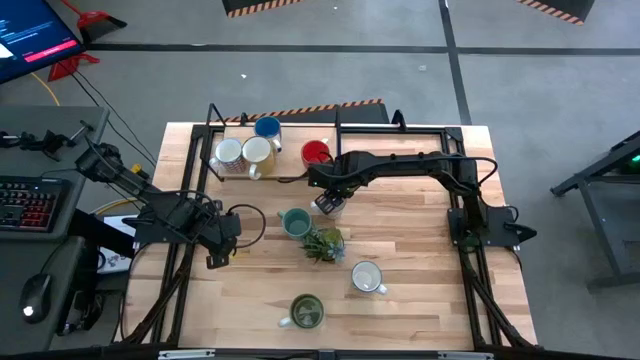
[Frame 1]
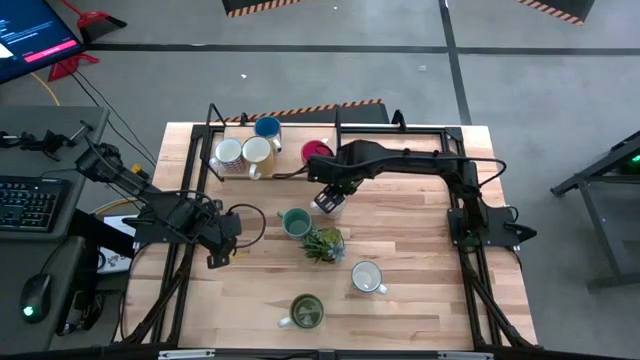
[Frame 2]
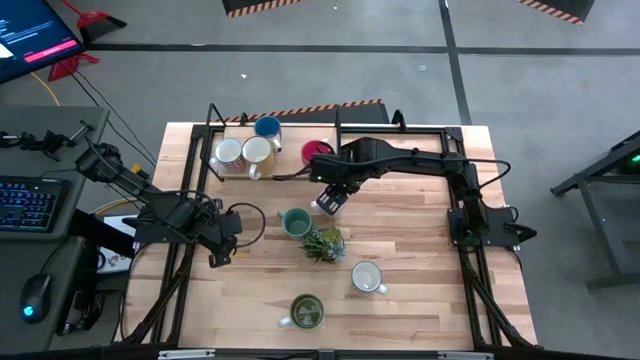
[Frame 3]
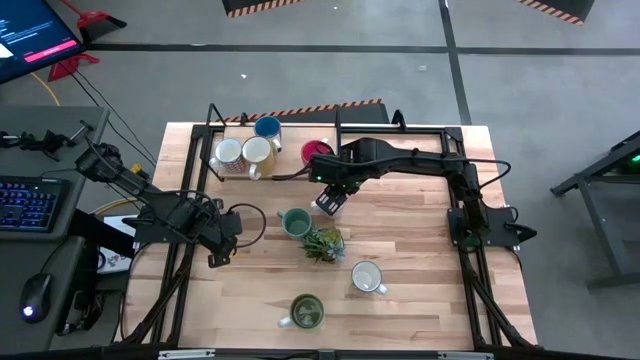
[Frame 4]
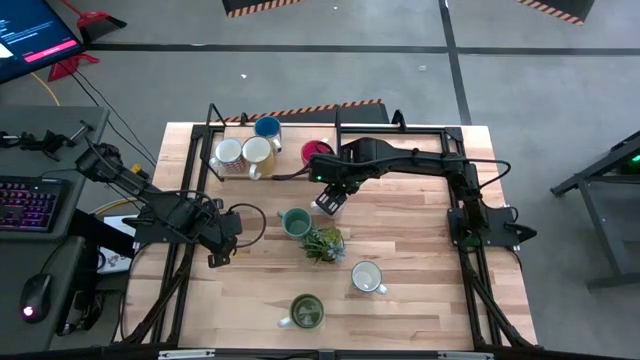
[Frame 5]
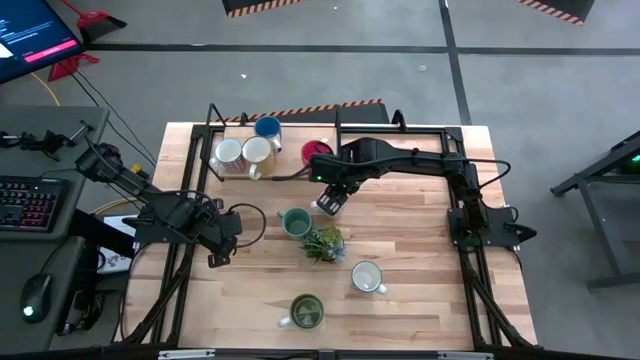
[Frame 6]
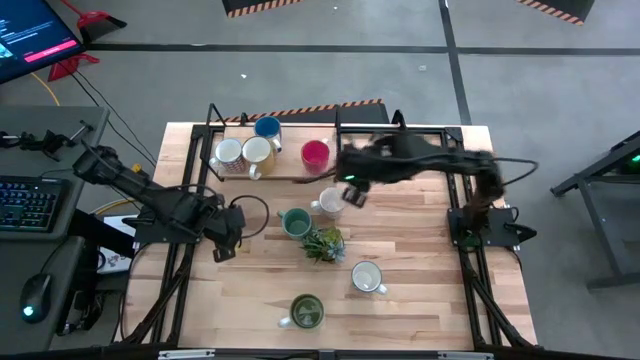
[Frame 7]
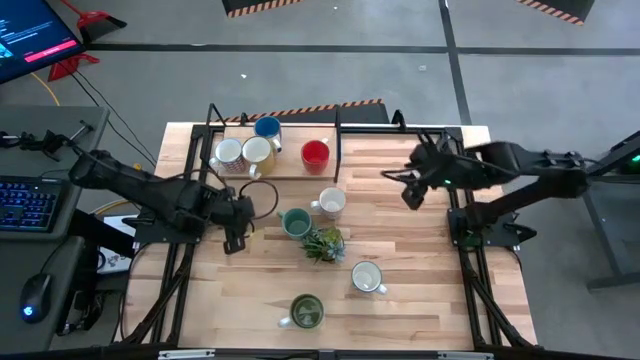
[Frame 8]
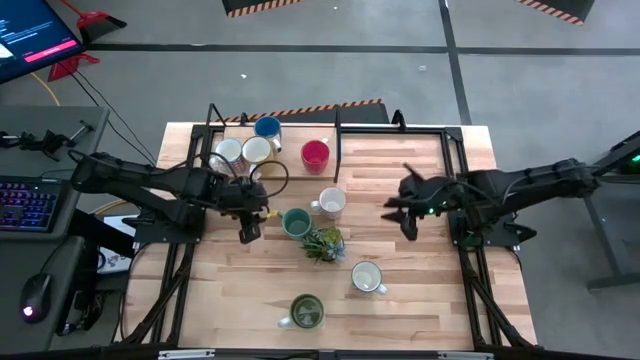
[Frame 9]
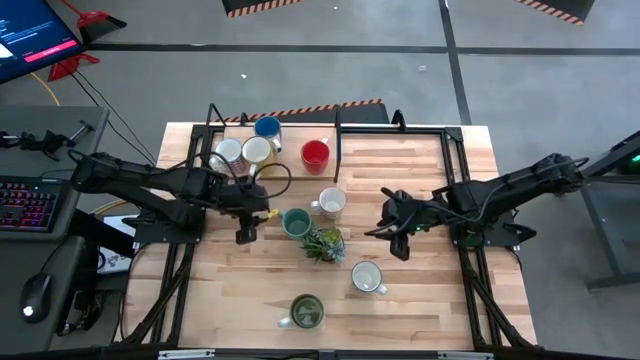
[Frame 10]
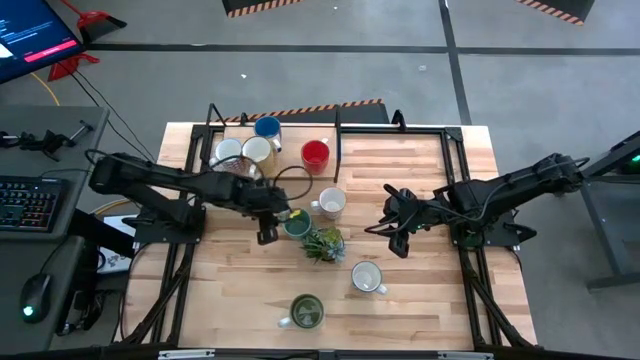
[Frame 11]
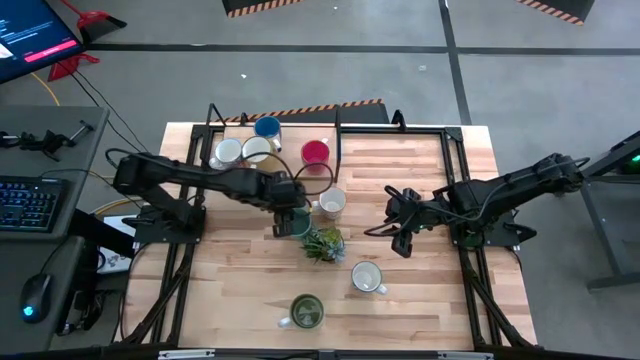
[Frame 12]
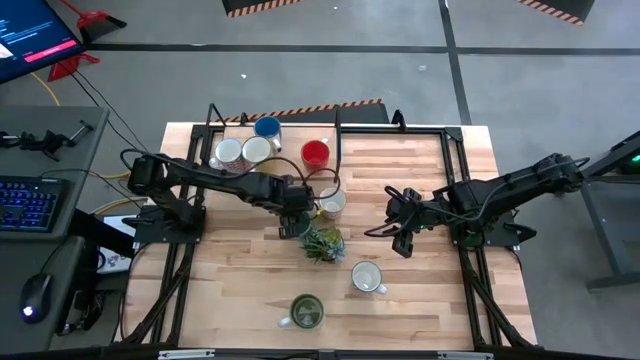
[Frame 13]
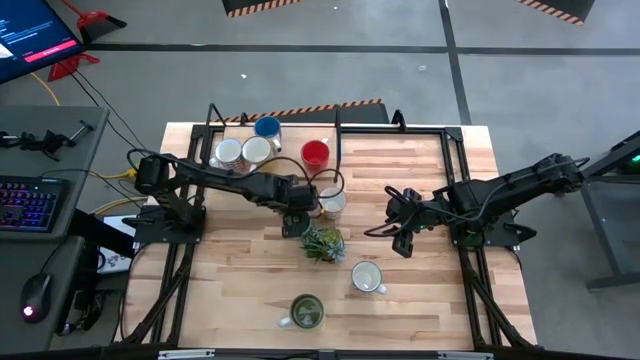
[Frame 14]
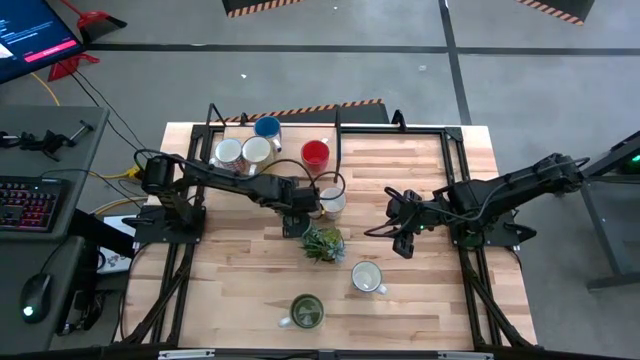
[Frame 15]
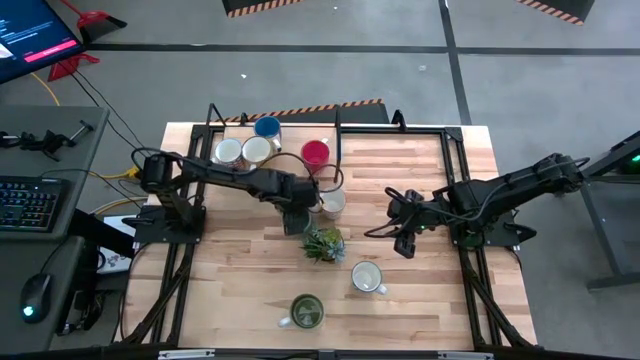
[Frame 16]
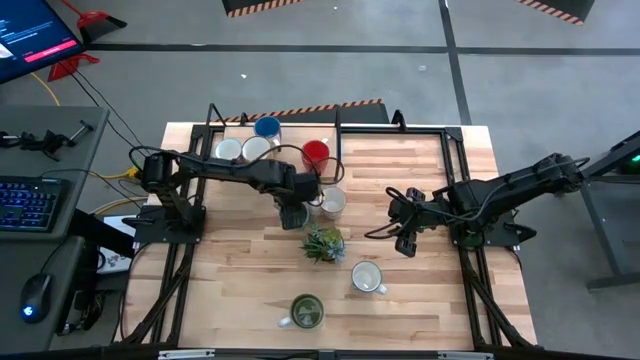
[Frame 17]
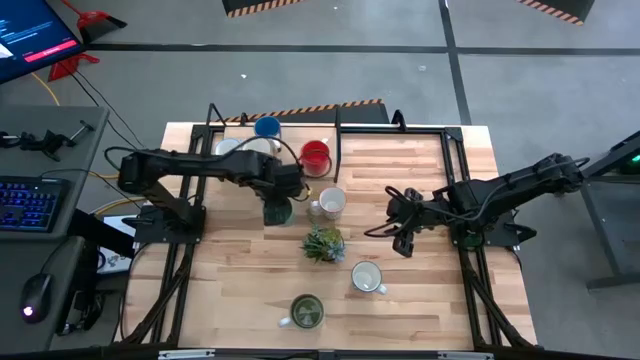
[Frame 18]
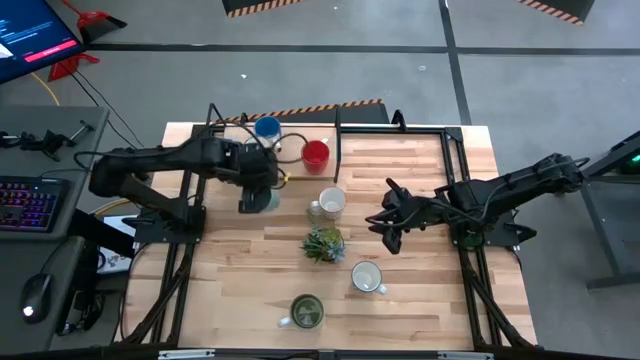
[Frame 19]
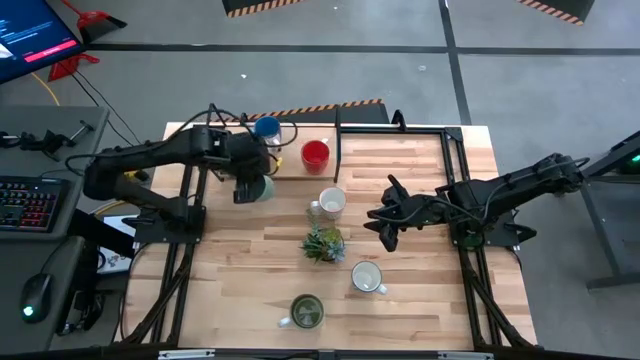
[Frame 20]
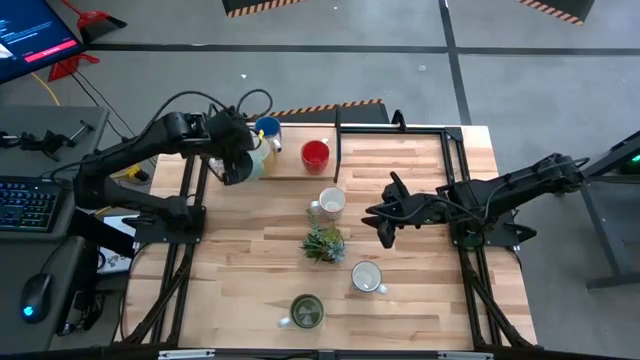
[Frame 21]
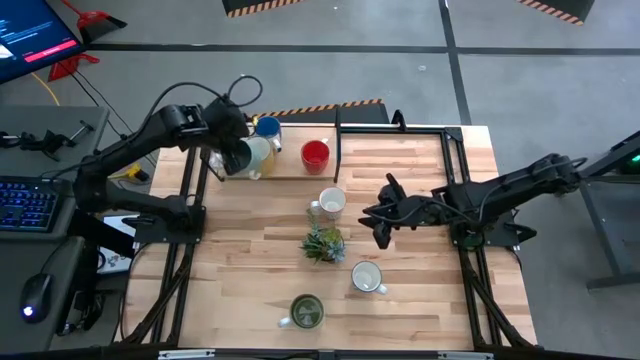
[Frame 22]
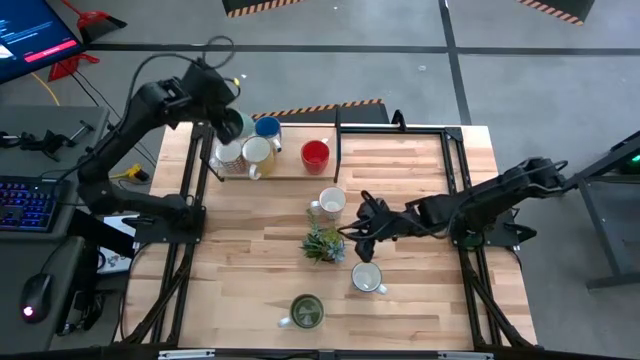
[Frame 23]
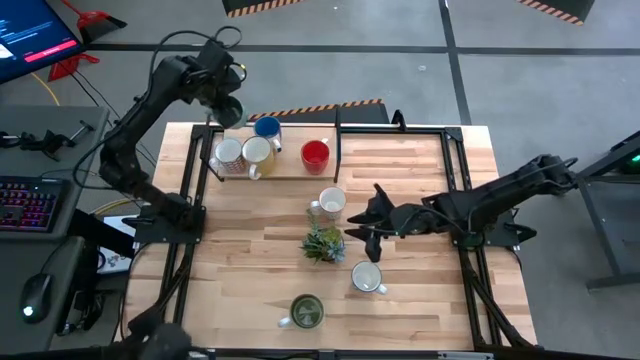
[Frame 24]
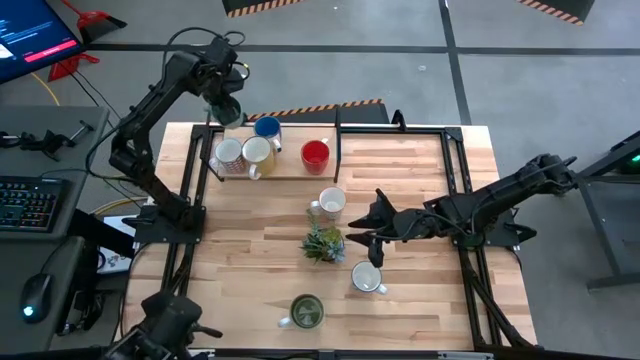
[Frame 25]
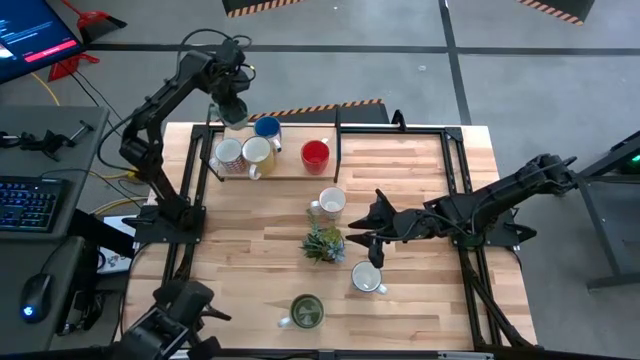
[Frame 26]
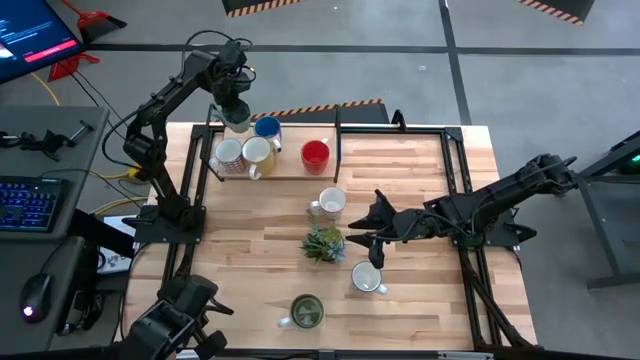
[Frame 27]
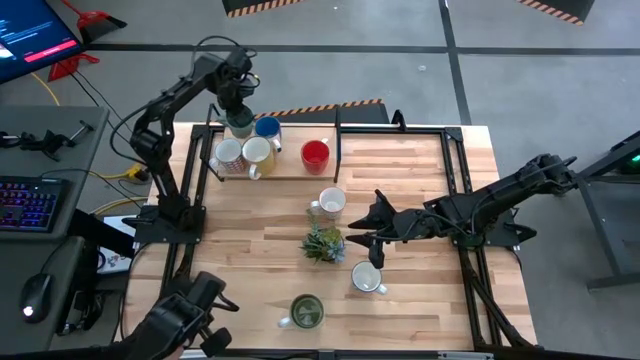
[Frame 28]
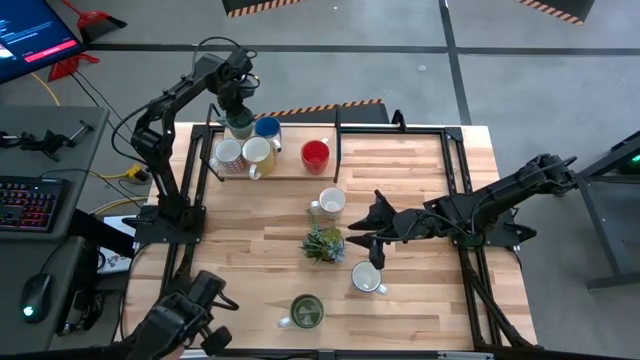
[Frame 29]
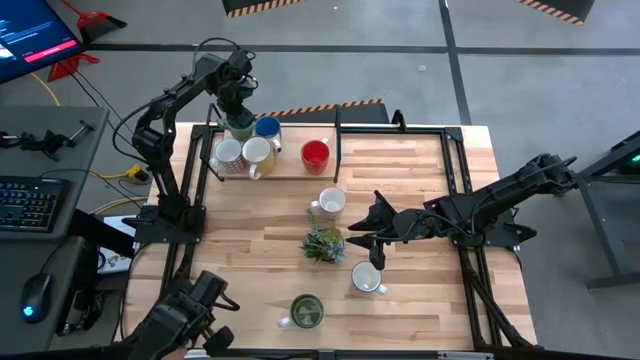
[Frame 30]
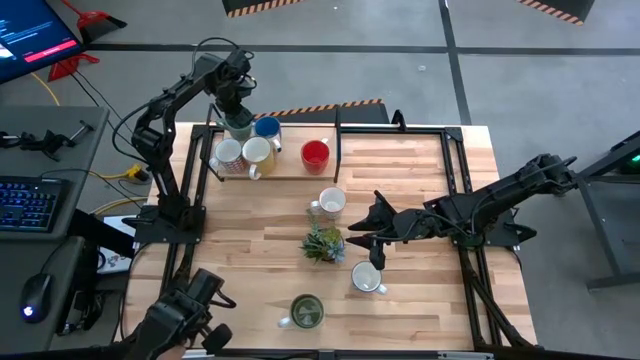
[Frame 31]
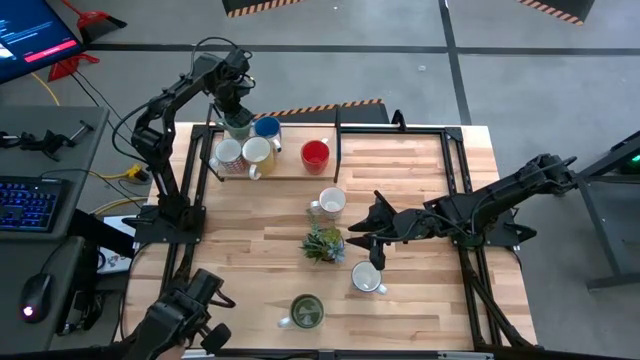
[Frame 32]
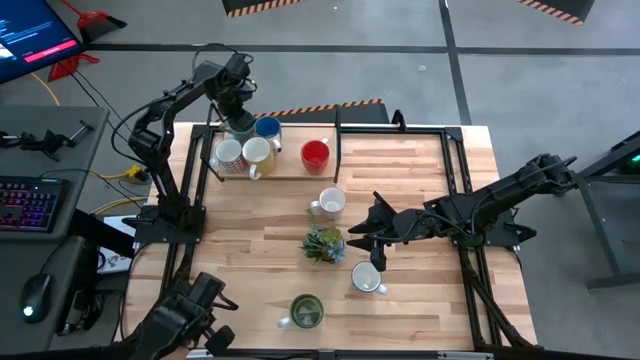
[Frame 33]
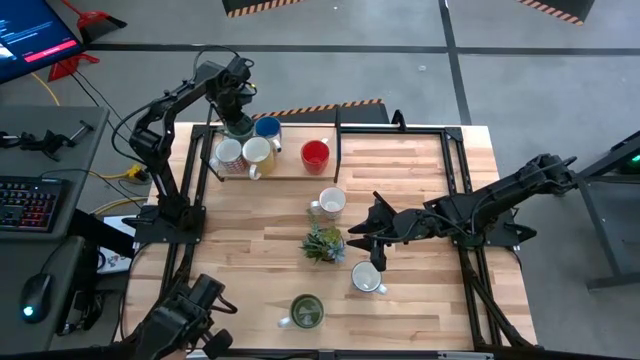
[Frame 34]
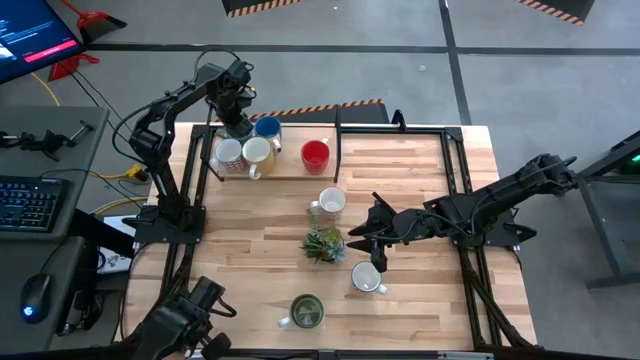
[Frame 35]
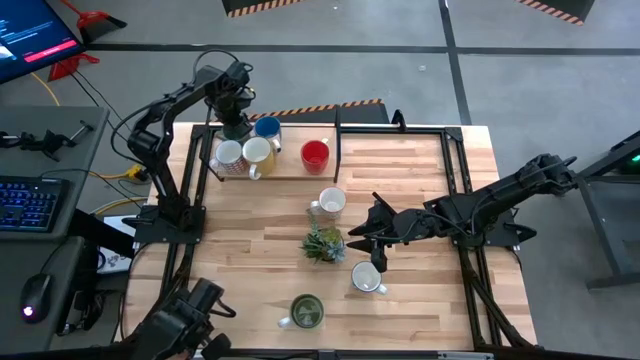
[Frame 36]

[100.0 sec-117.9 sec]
Task: Place coffee mugs
Put the light green mug on the shelf

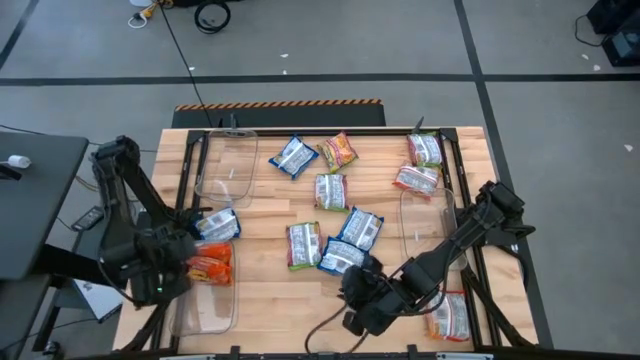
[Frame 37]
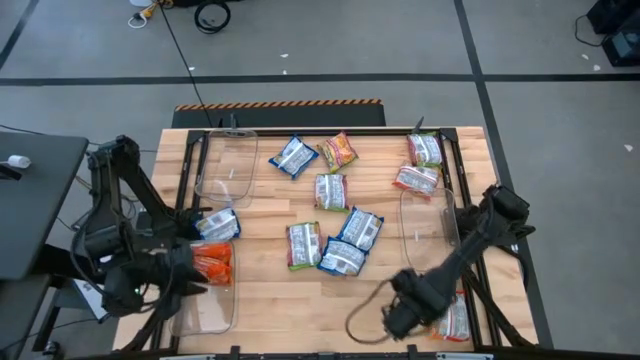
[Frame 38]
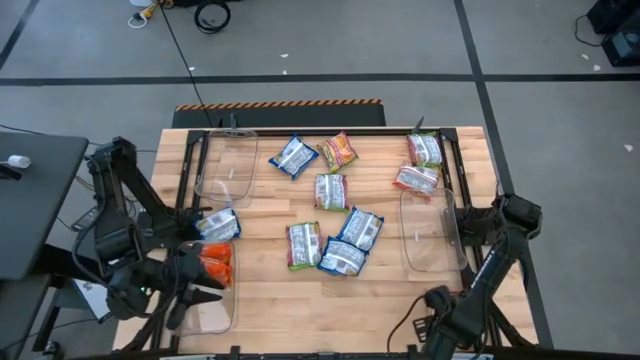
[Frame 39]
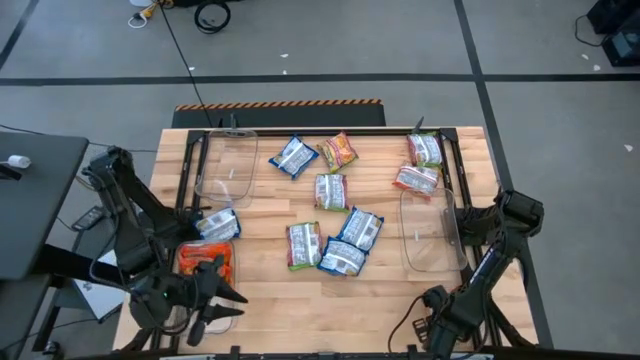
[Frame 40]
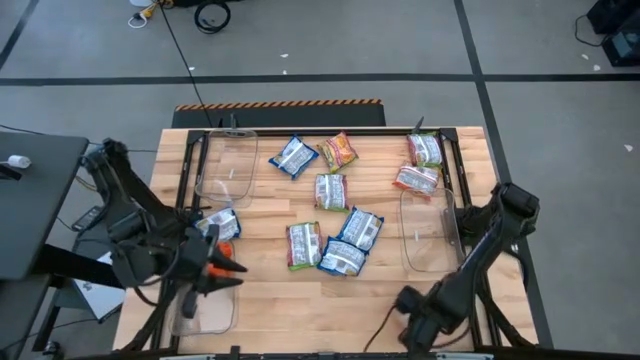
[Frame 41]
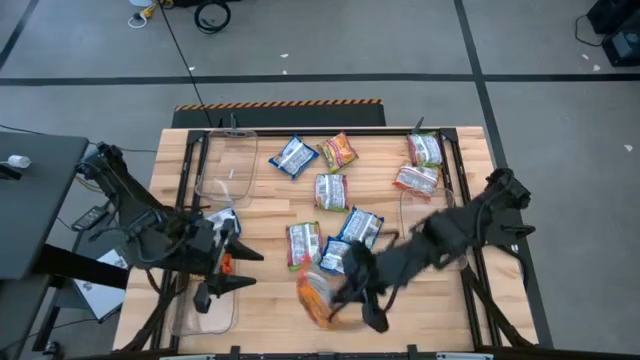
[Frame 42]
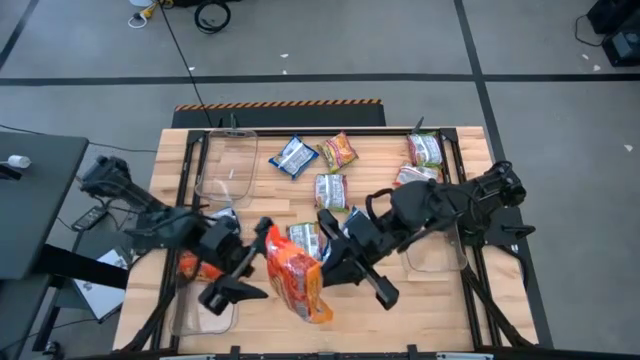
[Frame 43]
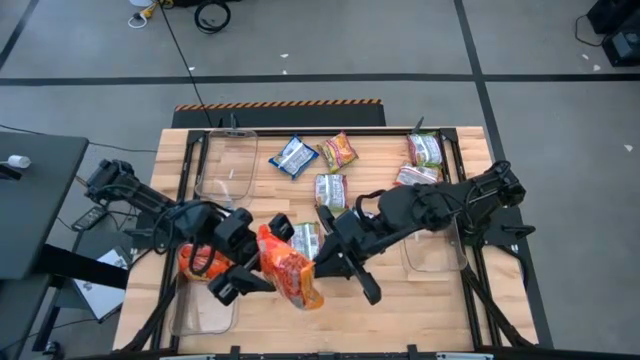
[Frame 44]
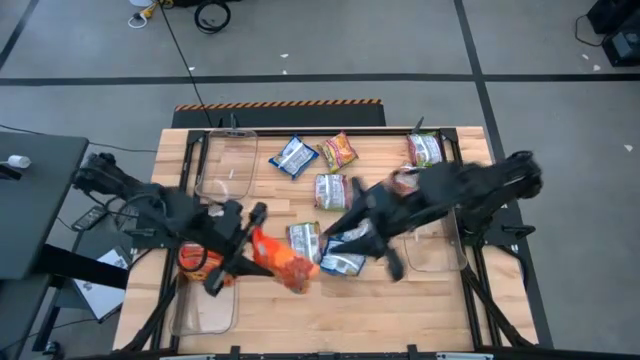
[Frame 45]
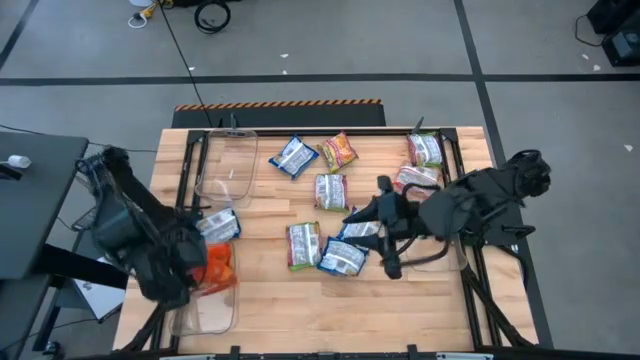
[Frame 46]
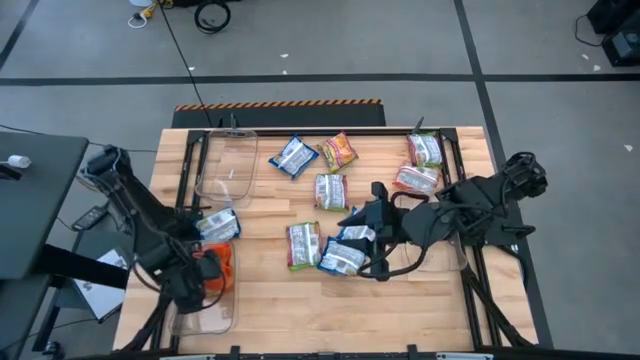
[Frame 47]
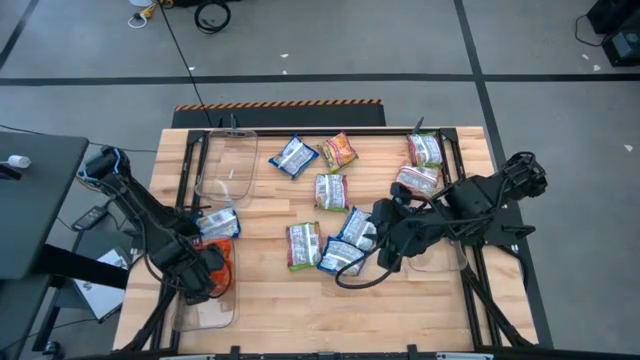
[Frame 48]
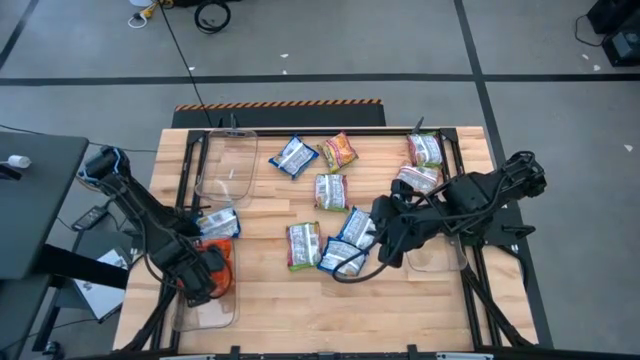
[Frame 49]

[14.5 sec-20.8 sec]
Task: Sort Maruchan noodles
Put the bottom orange noodle pack into the bottom left transparent bin
